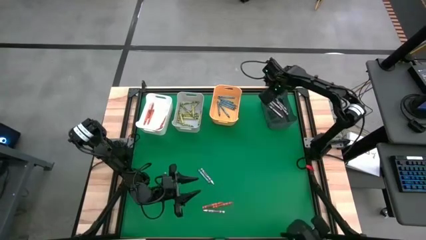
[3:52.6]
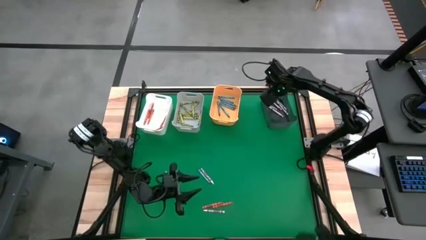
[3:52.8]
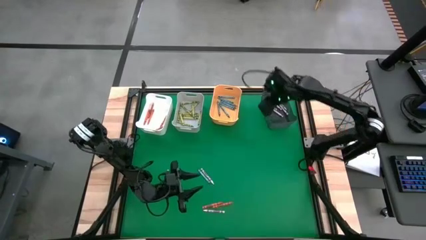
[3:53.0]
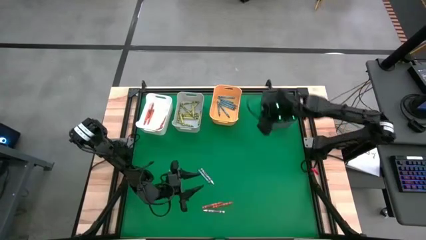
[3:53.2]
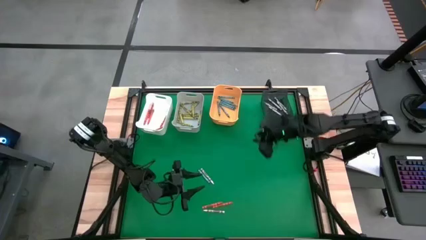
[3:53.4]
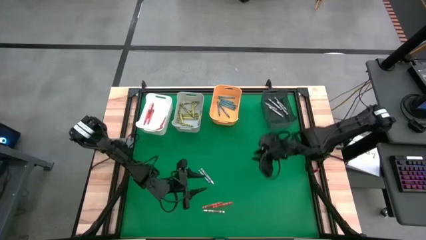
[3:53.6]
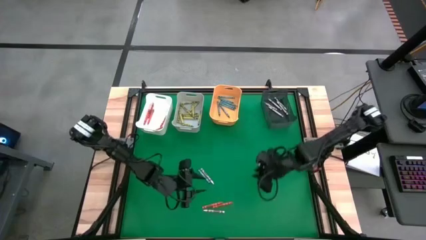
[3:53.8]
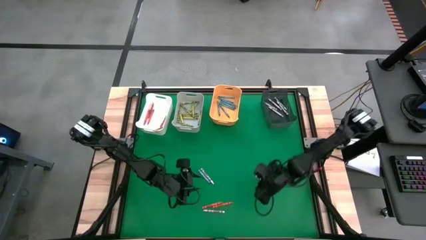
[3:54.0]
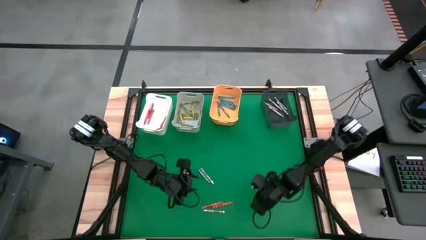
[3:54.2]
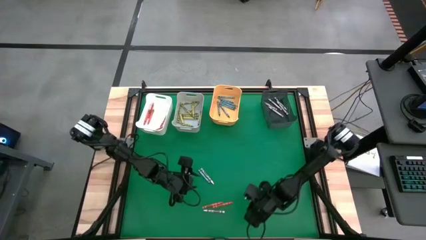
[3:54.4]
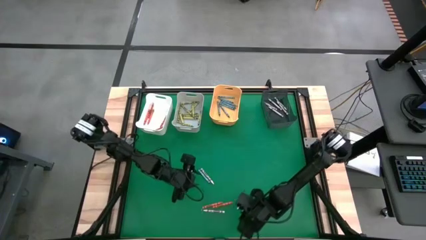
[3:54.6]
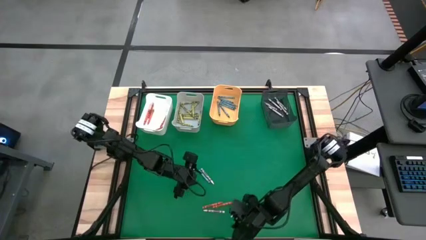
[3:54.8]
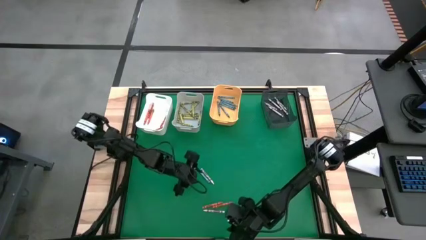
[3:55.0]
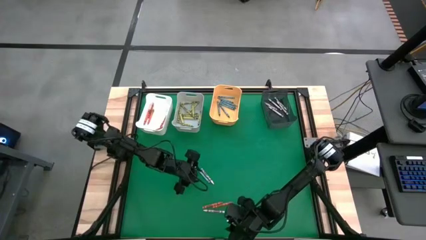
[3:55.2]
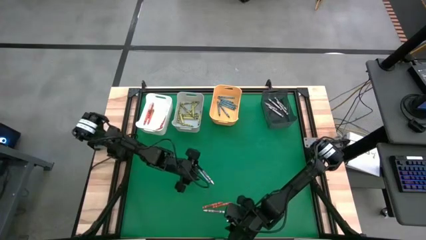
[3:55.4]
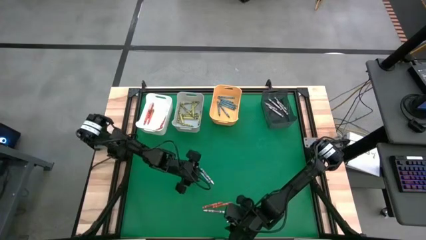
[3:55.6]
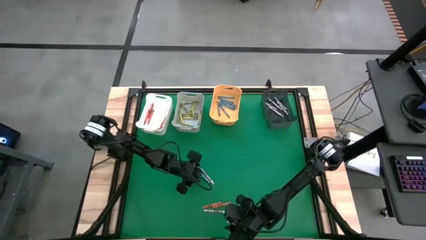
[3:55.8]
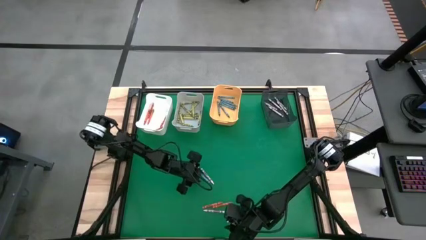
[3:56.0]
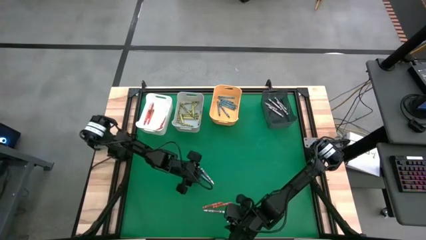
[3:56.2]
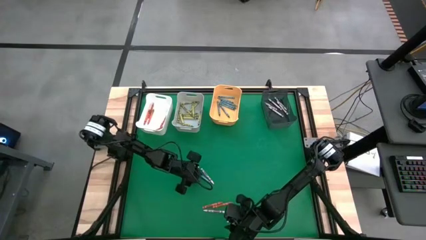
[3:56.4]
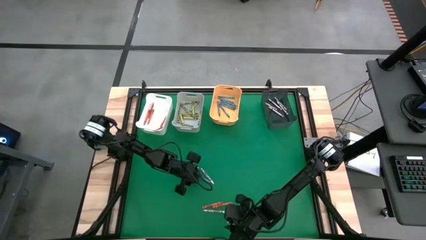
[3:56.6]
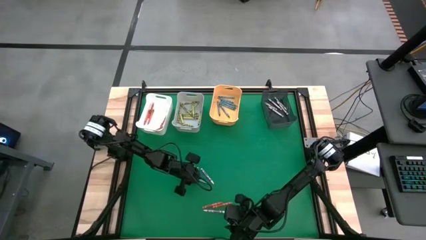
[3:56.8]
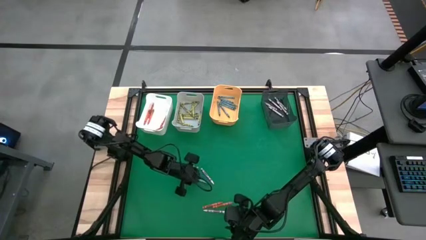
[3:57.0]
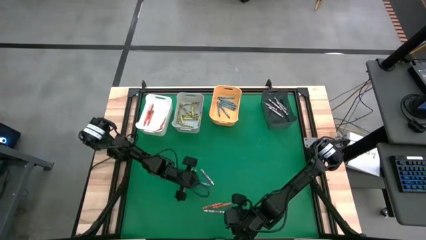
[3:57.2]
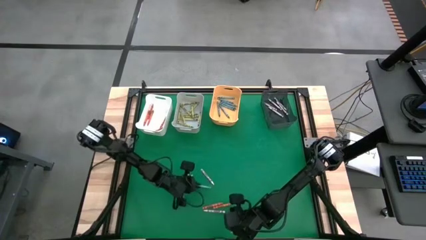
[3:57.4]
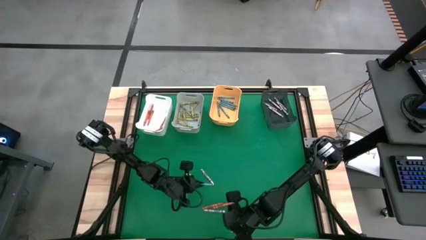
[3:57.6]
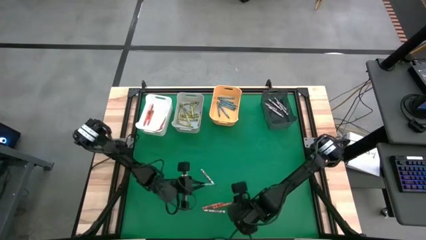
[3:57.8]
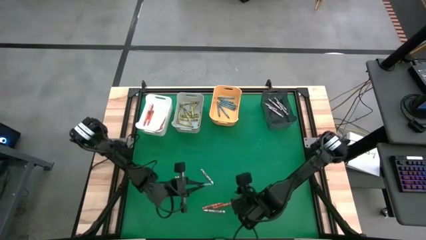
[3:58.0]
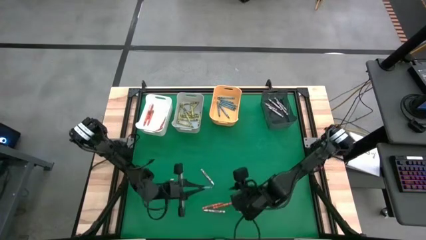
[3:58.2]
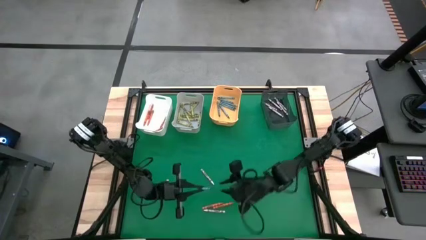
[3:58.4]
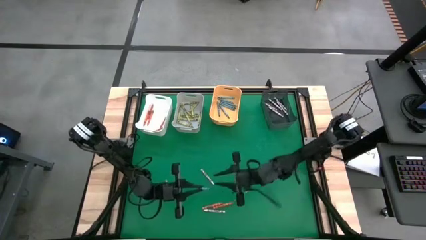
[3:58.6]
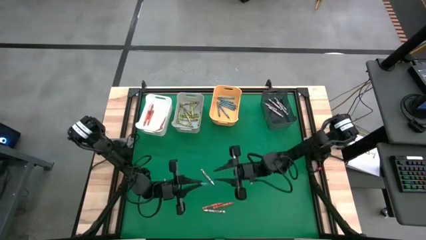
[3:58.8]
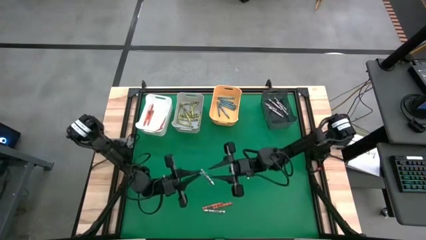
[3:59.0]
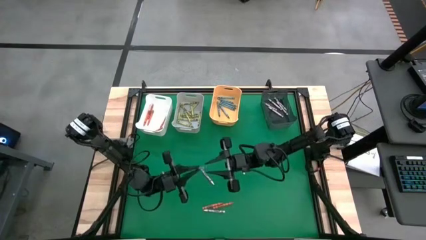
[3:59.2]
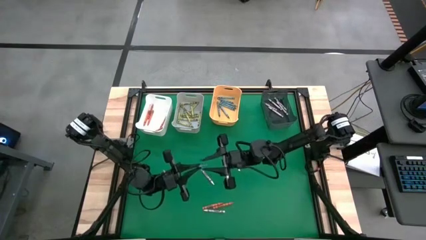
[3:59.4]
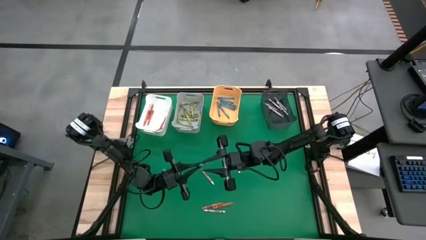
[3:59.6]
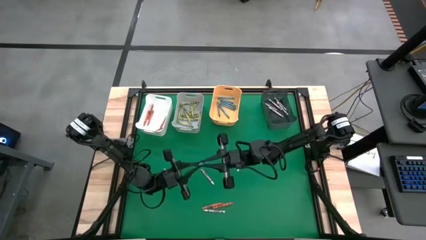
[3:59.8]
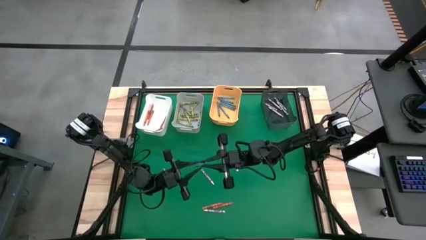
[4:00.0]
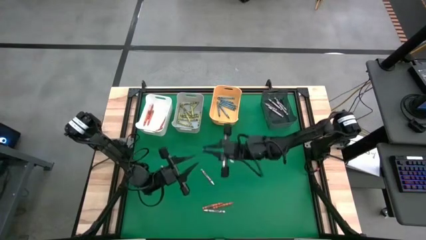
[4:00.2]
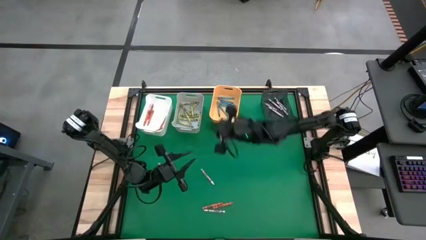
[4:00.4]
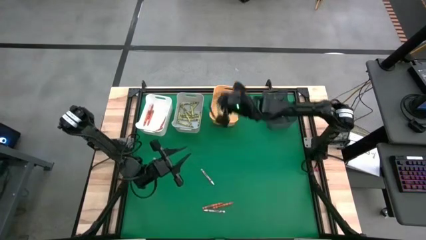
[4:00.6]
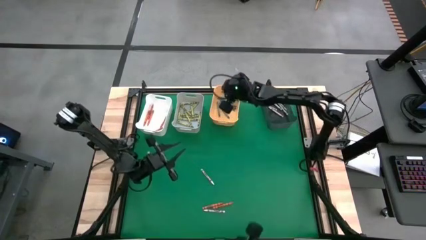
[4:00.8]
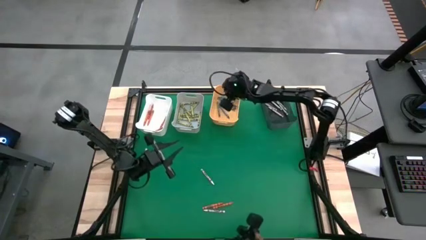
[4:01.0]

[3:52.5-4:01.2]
Task: Sort crayons
Put the blue crayon into the yellow bin

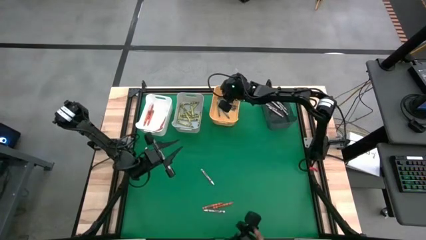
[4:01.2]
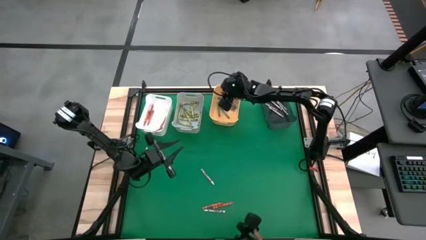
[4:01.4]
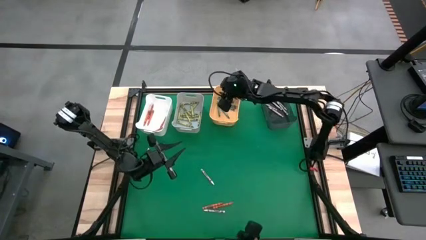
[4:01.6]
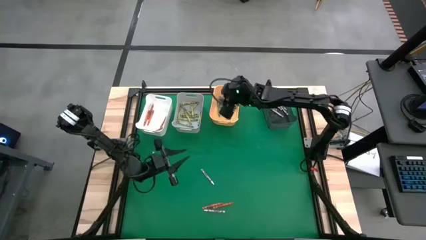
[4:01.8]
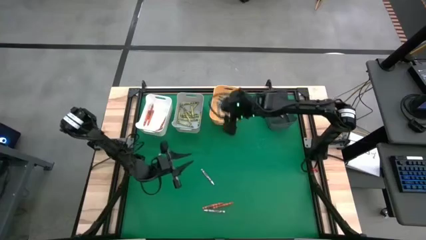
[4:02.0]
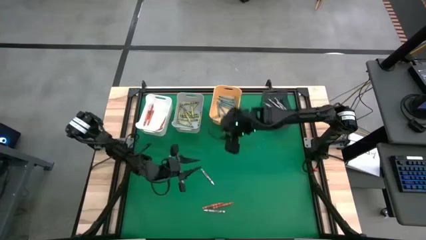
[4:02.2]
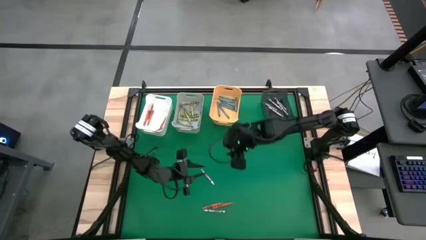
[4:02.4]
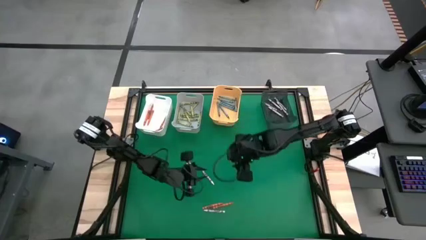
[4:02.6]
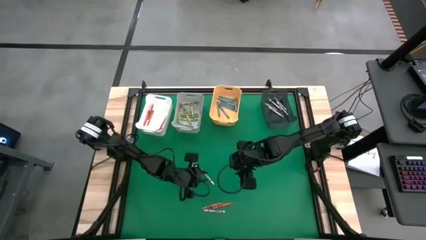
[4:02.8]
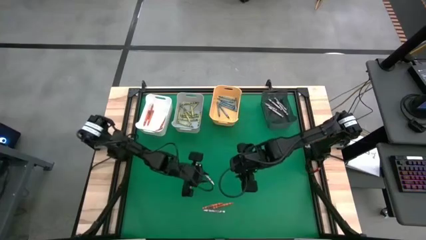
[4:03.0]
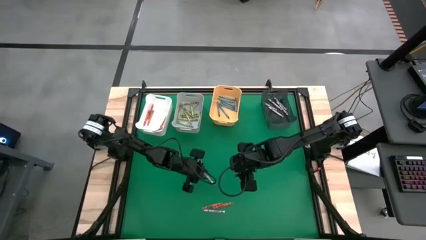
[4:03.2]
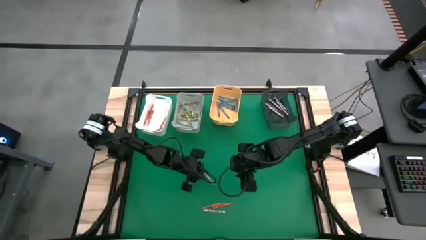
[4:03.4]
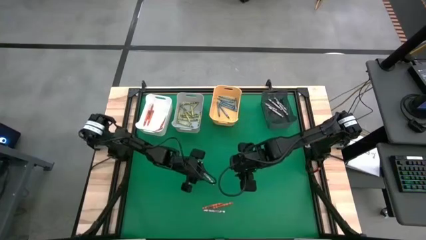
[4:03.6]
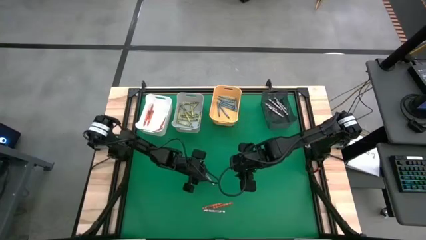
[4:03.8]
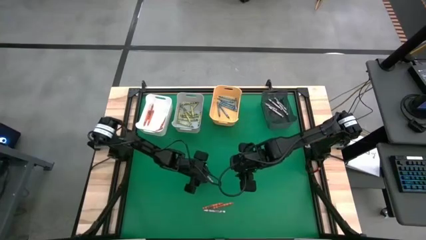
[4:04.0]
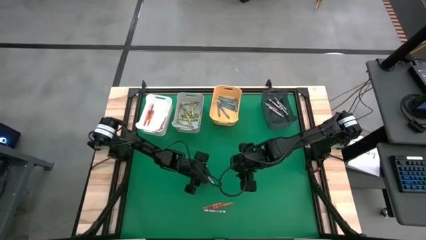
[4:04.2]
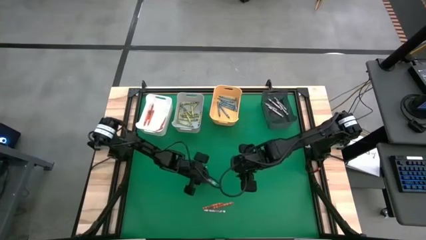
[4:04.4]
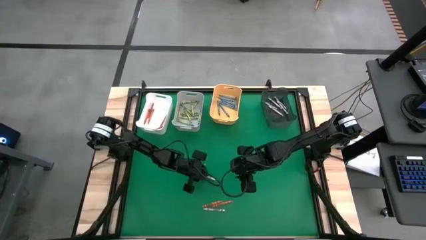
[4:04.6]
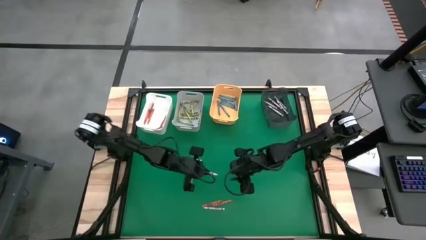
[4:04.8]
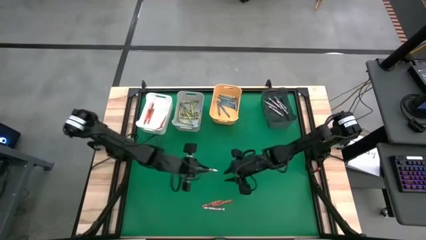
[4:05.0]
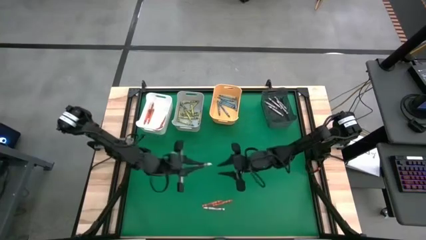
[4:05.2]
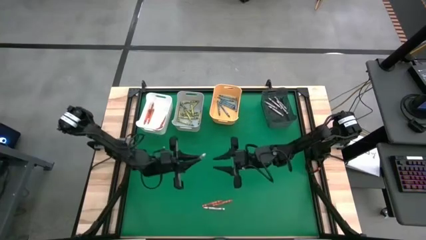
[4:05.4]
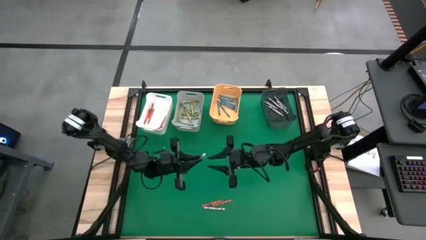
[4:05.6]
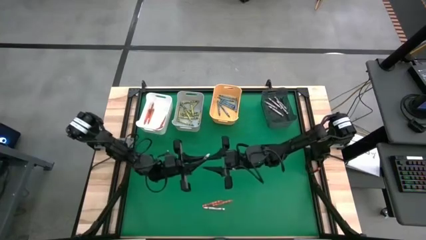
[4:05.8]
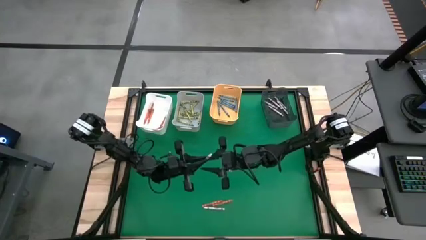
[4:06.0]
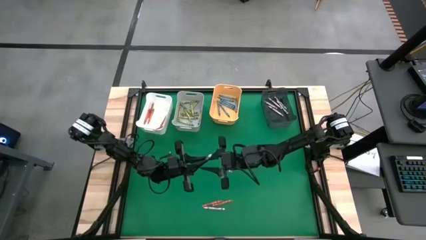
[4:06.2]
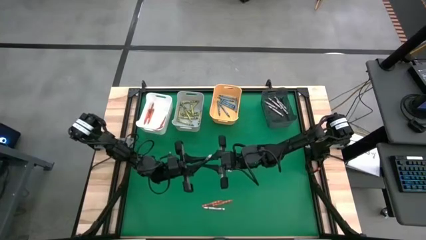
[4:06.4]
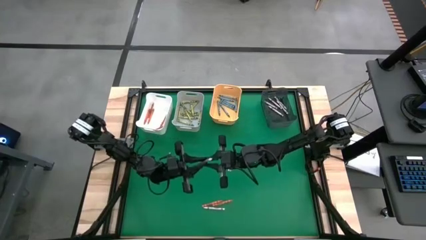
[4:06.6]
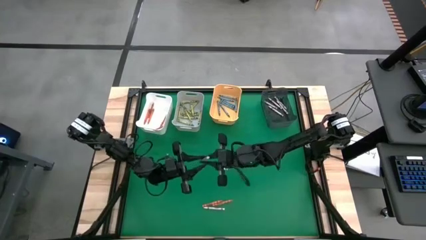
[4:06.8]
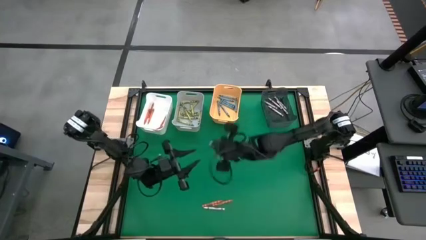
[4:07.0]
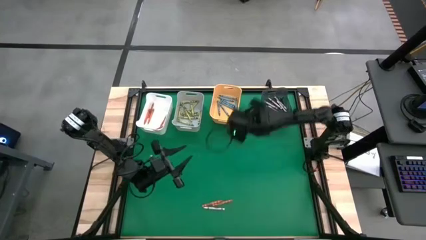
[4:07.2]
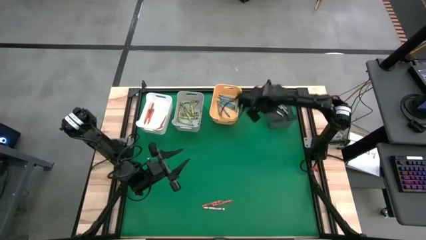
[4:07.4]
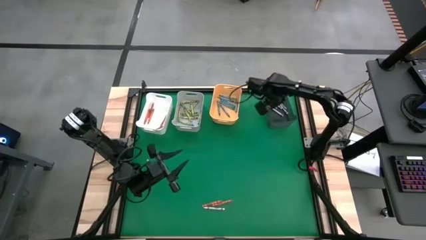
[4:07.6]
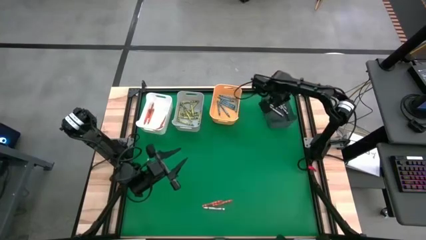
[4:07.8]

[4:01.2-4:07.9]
Put the white crayon into the black bin
